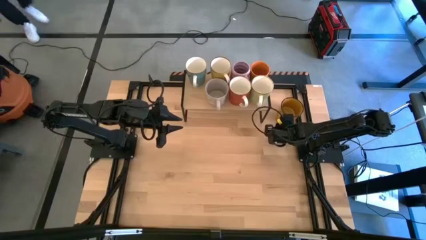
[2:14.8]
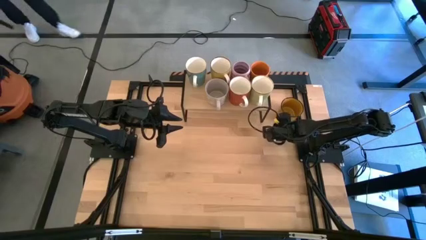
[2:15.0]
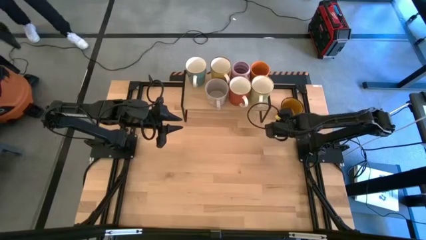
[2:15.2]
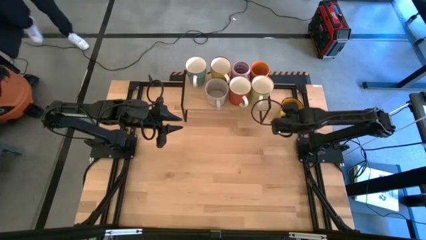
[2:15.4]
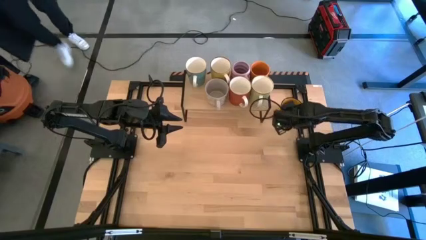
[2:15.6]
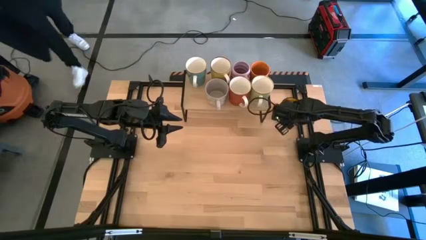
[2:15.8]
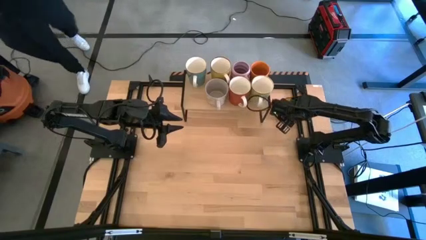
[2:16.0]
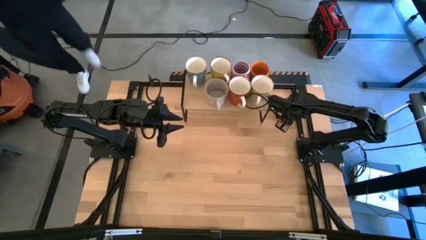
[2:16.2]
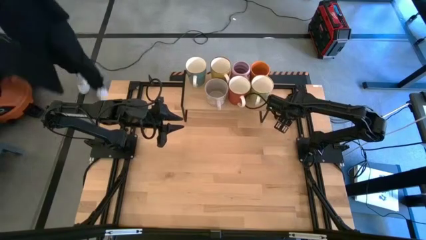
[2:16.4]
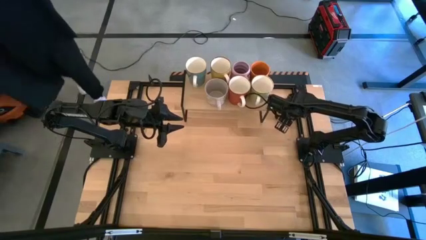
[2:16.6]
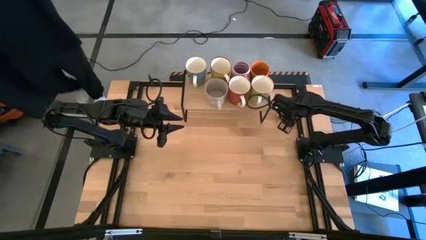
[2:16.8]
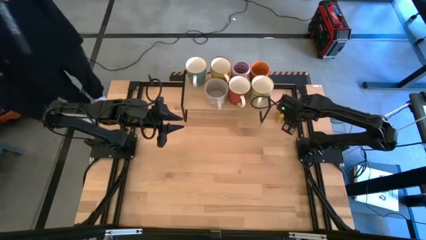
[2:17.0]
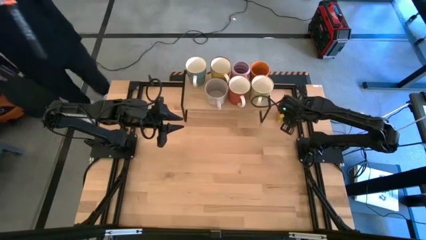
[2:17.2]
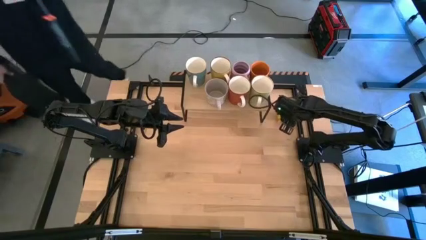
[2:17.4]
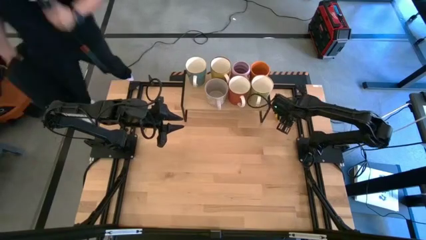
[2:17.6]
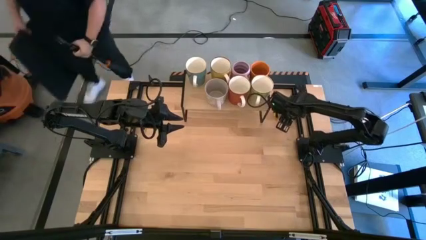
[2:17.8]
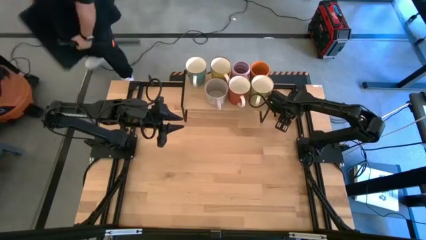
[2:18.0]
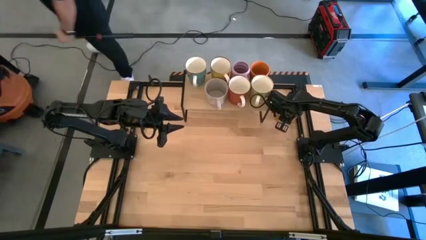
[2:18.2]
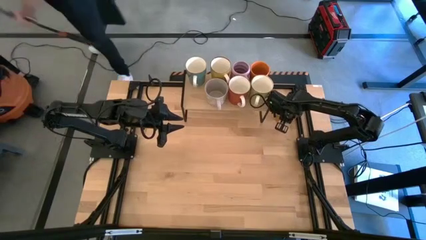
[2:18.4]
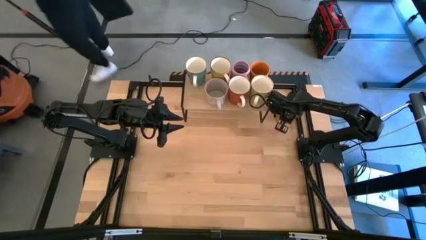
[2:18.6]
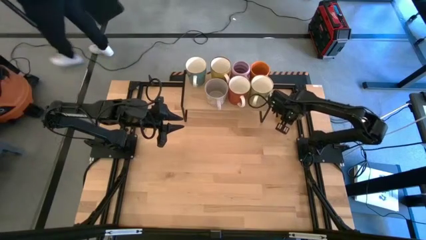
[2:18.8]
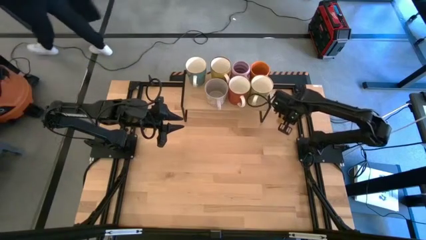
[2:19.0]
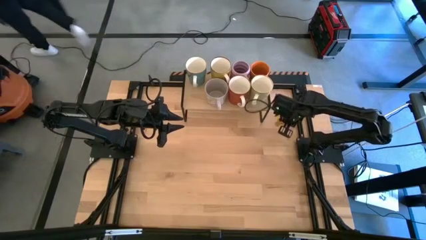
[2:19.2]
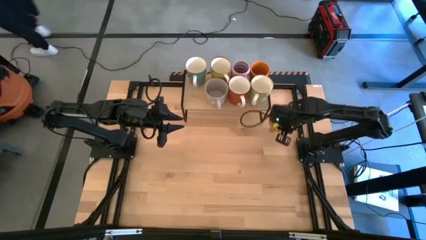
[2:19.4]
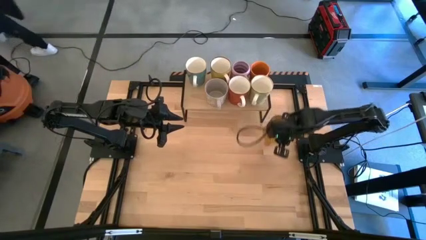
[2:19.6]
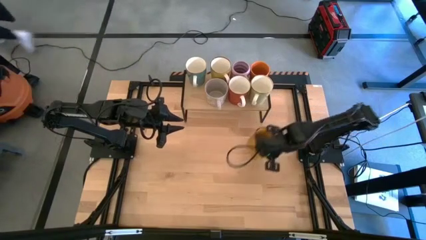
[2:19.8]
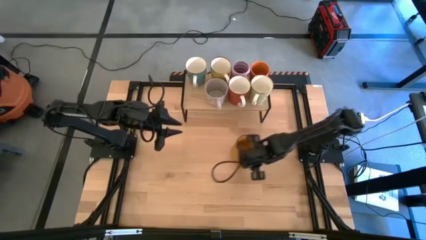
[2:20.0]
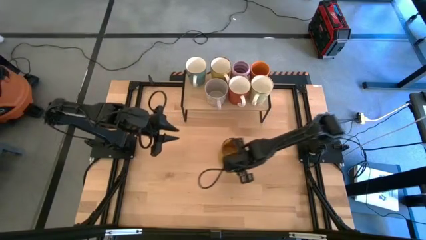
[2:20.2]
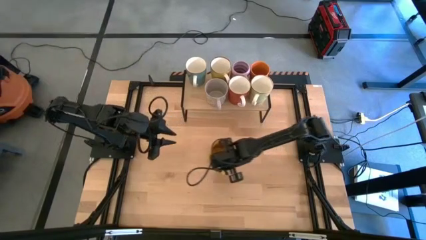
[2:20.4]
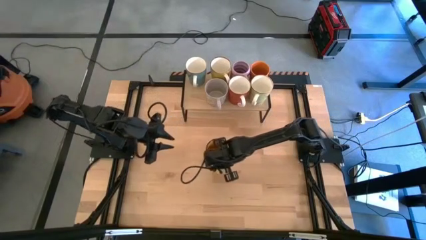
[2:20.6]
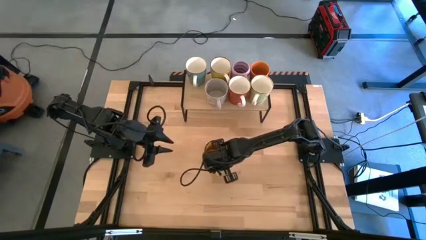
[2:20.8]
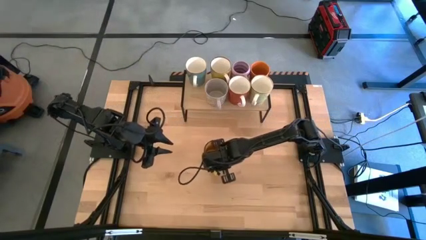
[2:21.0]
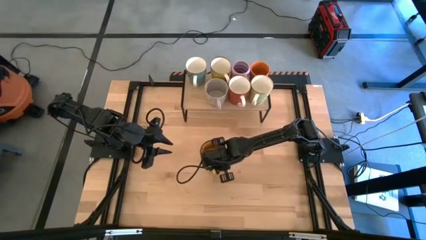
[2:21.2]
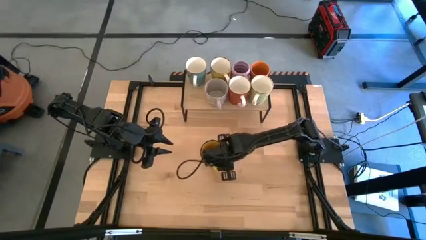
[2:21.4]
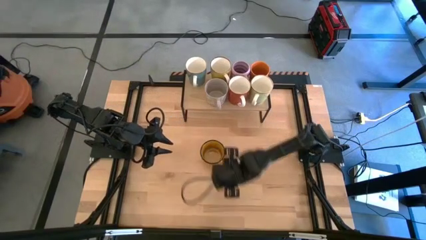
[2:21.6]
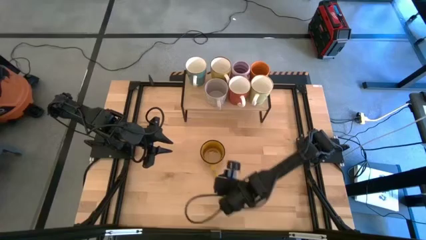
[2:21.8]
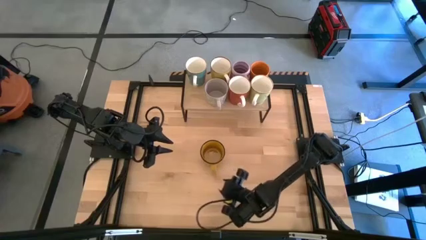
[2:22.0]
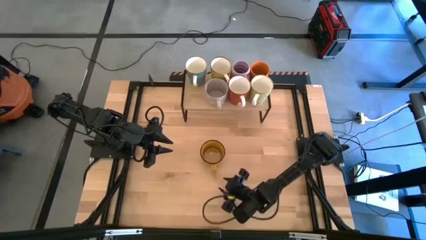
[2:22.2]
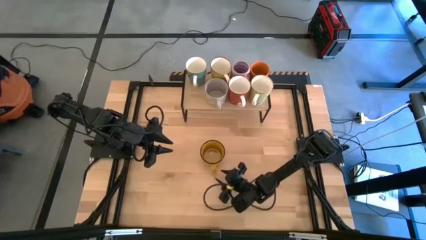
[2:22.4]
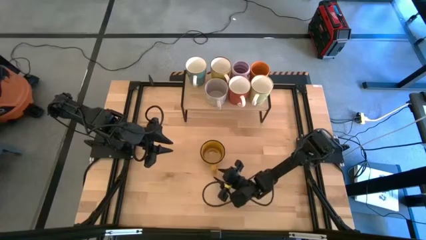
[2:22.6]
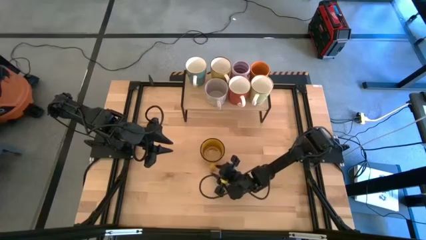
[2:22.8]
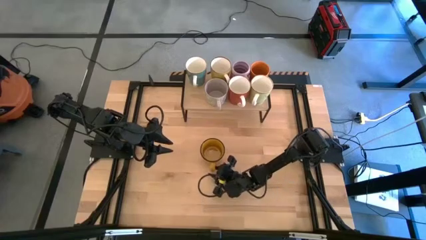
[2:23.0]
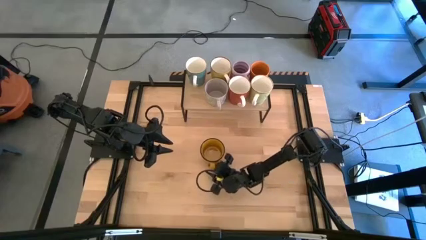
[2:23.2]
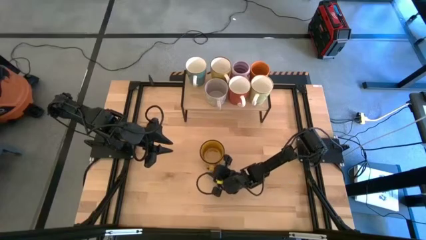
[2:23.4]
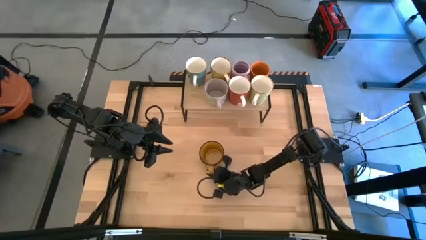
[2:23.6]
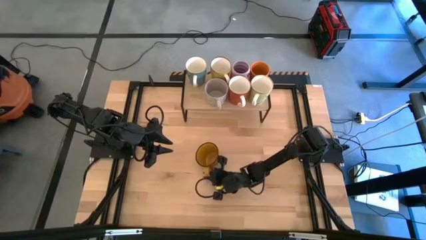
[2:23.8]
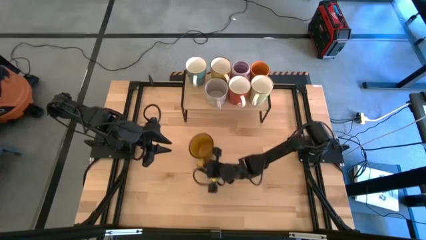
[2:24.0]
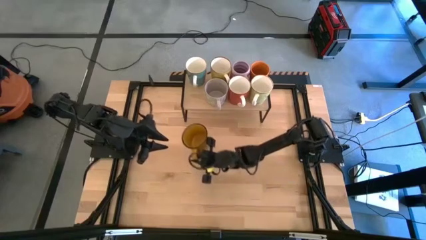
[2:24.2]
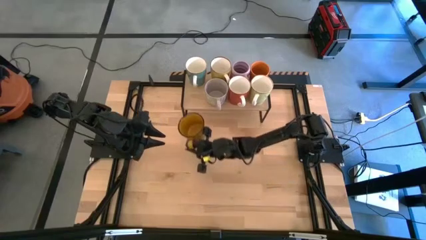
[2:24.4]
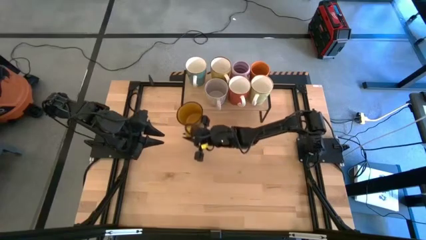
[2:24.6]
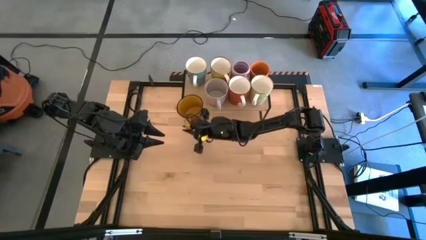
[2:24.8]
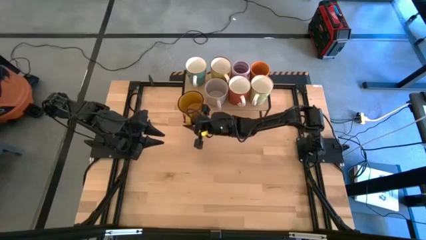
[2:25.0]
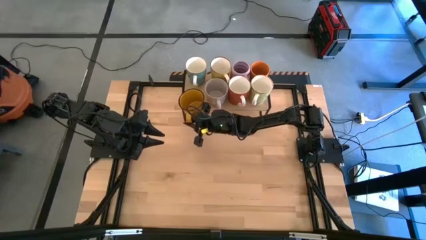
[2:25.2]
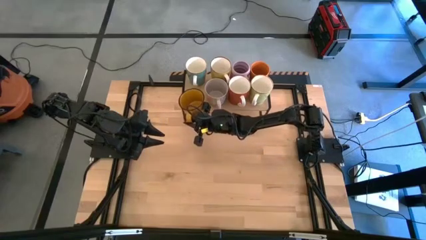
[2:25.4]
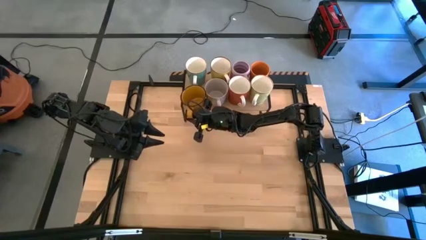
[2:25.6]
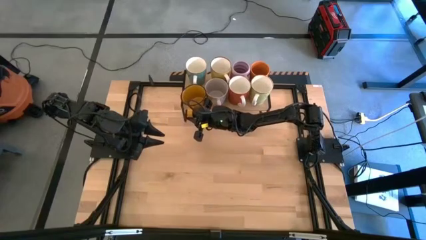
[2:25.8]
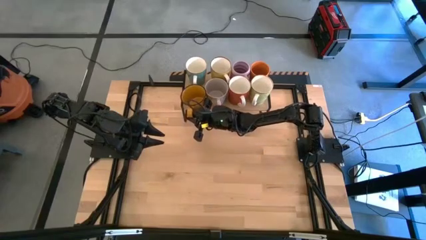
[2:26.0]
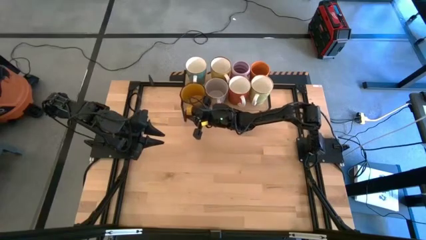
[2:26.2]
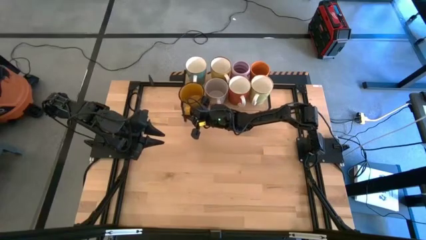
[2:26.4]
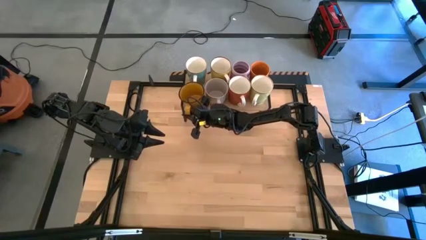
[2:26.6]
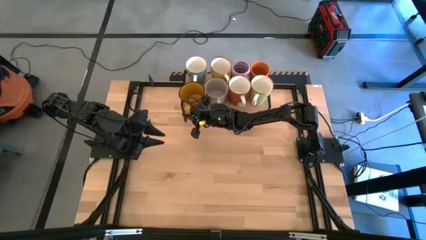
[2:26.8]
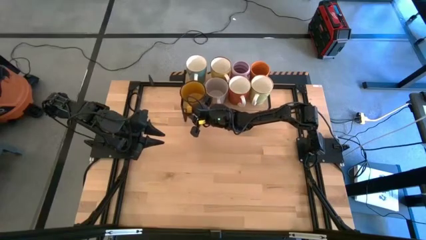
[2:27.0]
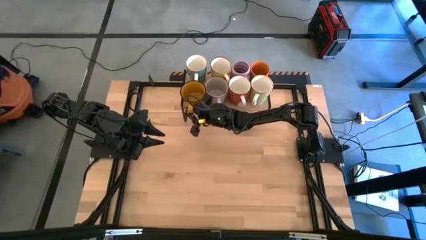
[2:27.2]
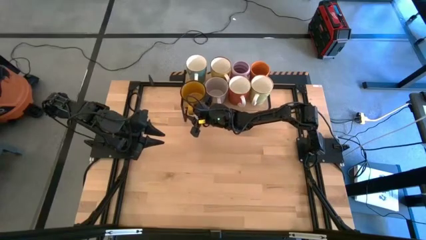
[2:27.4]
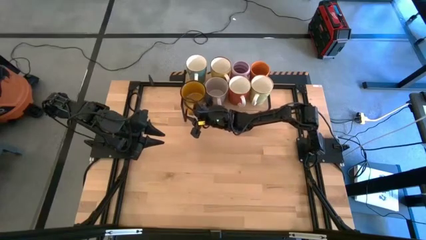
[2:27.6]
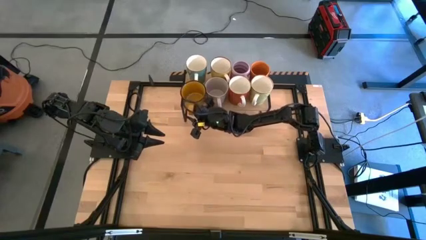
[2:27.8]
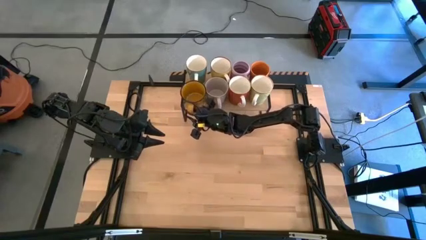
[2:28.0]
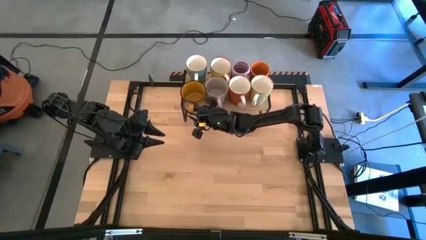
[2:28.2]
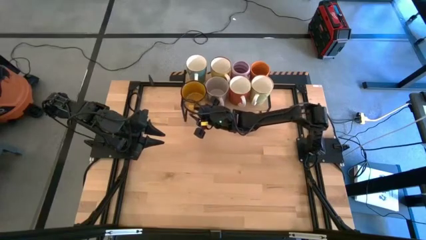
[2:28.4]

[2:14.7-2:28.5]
Task: Place coffee mugs
Put the yellow mug on the shelf

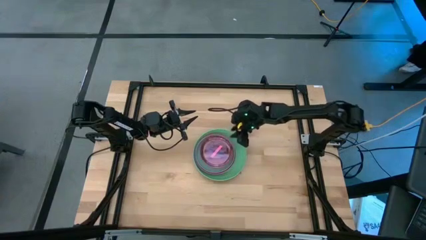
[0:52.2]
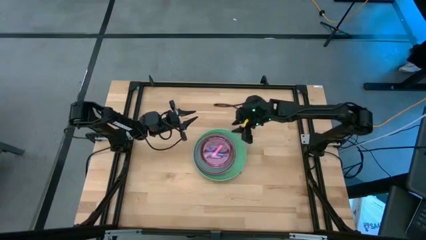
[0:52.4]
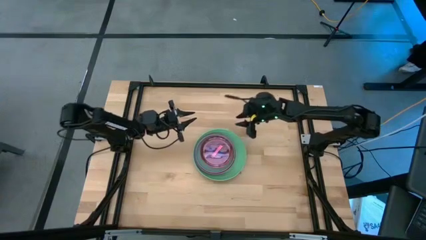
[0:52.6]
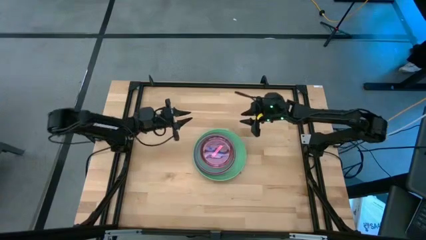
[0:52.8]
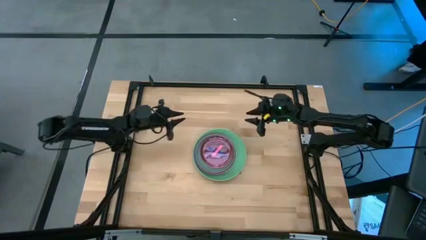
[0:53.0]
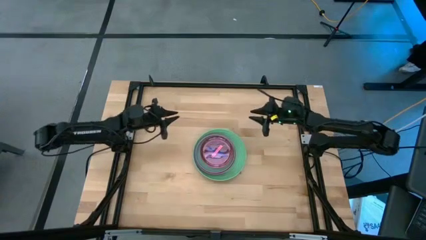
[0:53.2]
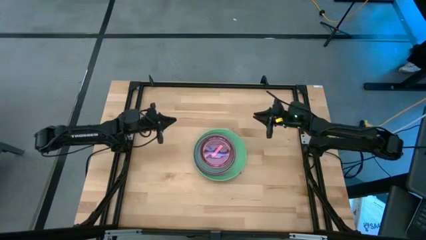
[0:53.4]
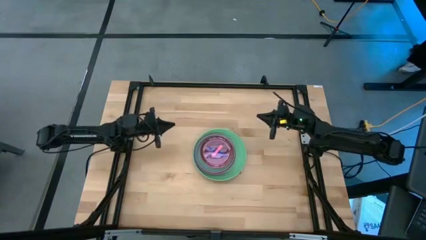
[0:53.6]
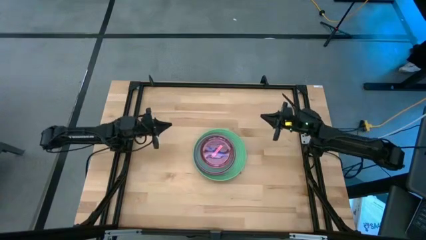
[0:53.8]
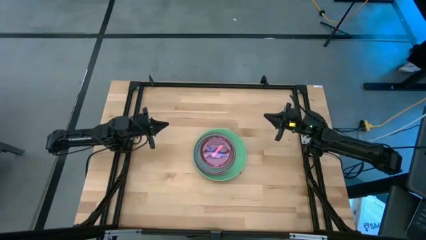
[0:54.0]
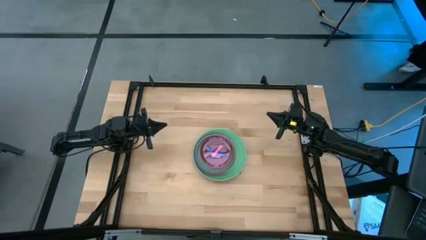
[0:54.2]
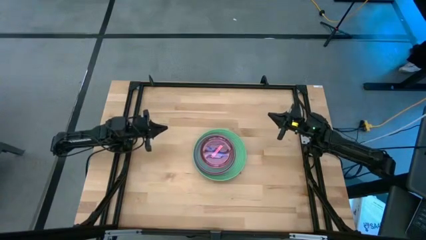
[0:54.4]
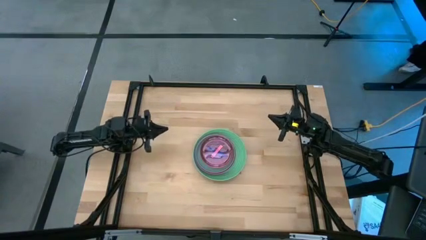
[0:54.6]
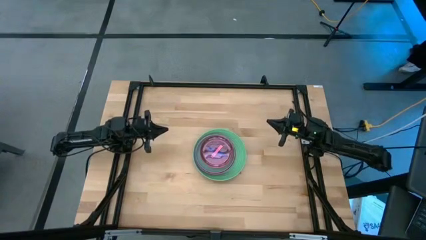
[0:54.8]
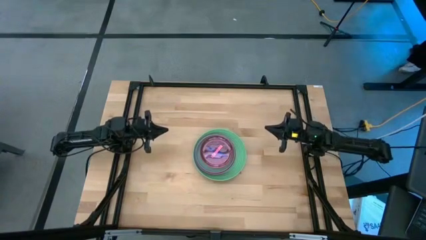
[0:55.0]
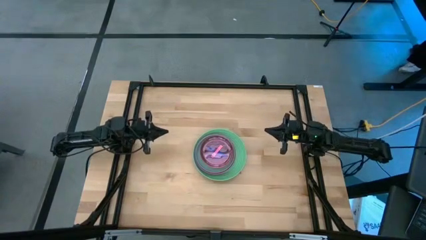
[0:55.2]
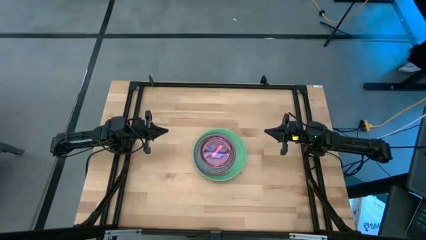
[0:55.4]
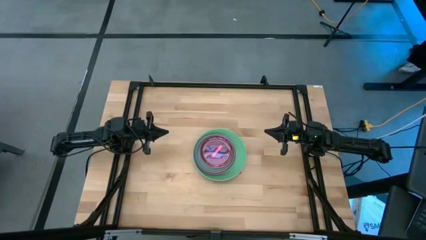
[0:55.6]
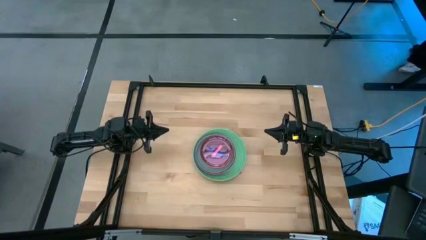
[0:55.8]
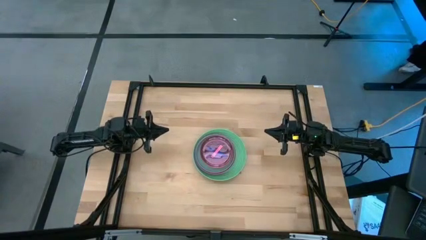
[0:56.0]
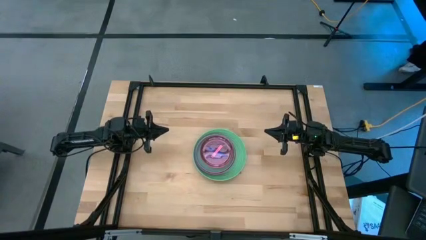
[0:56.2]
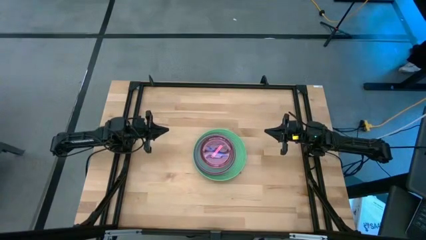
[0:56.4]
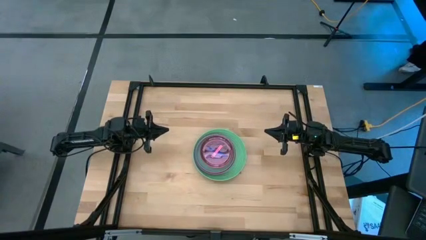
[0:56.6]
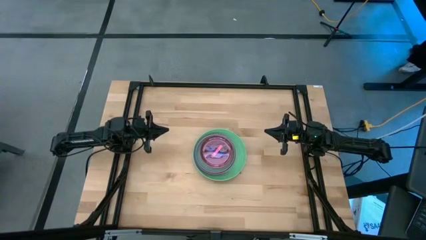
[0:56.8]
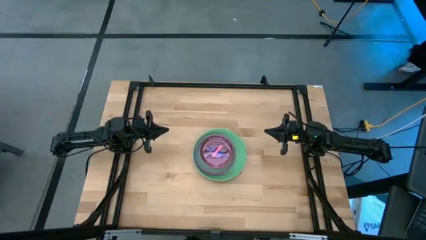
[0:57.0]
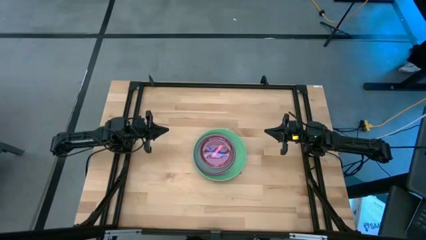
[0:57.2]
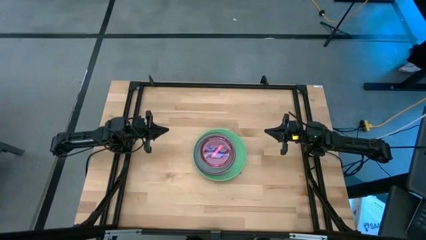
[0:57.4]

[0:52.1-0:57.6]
Task: Stack plastic plates
Return to Home Position
